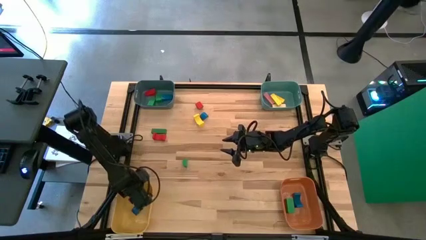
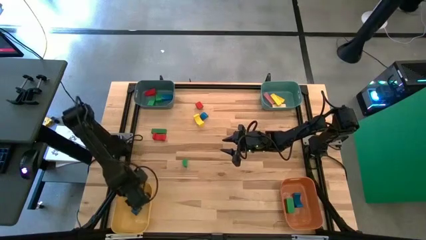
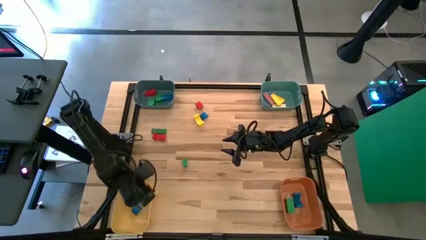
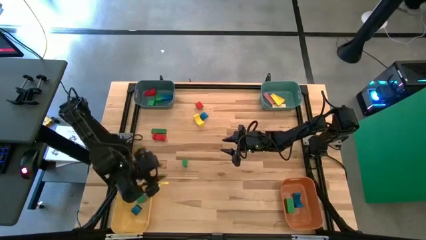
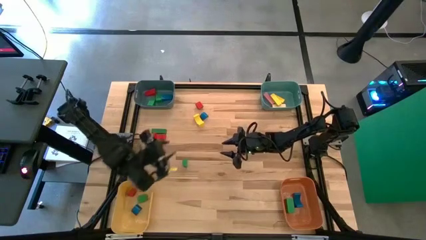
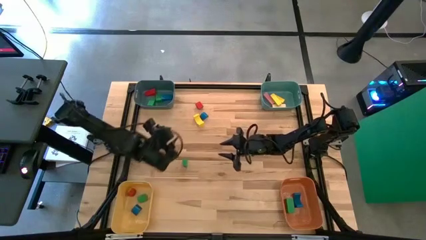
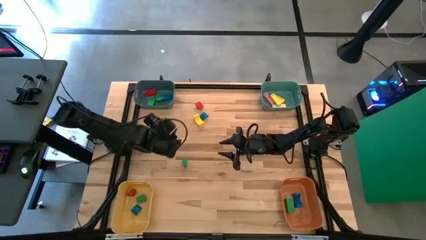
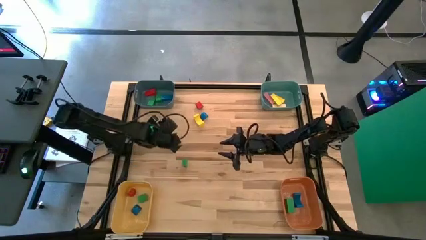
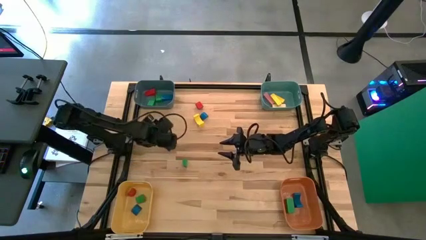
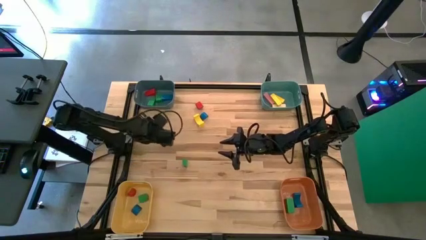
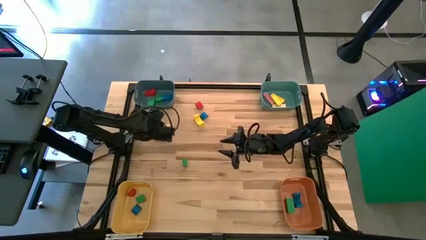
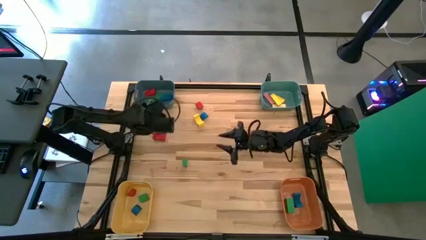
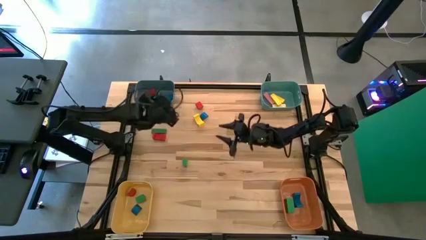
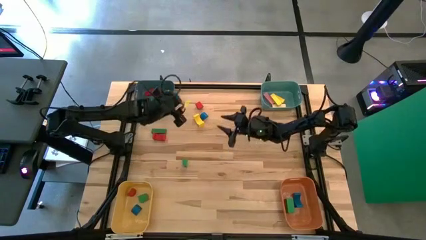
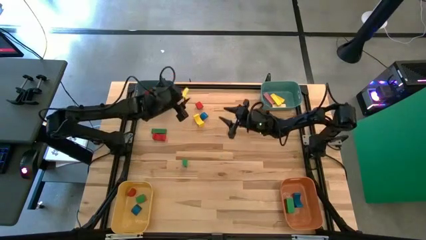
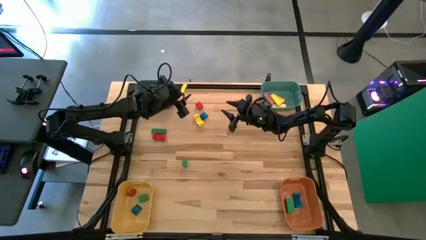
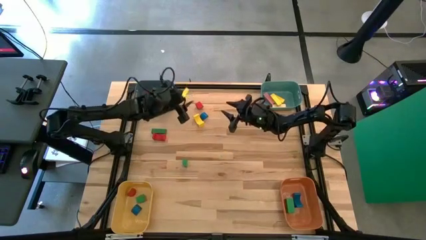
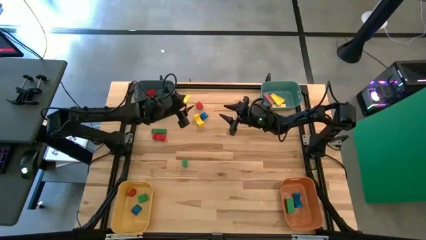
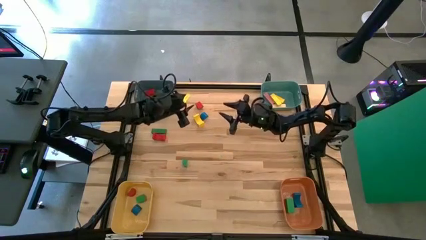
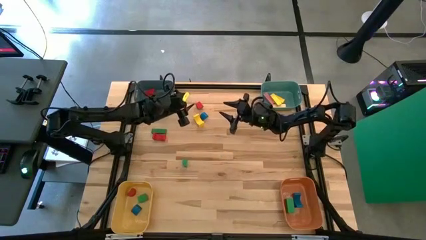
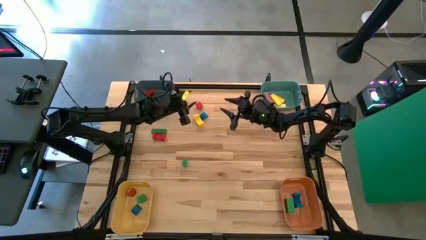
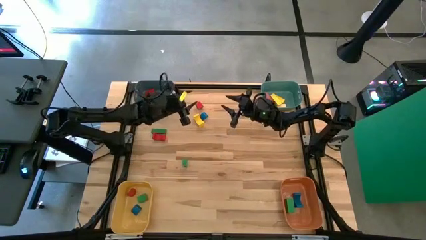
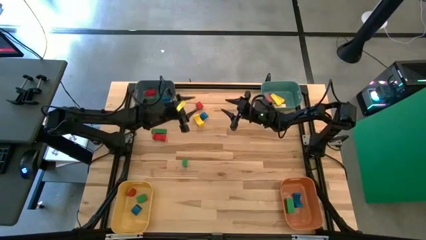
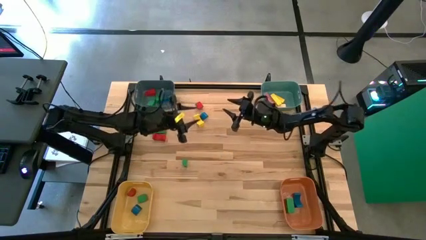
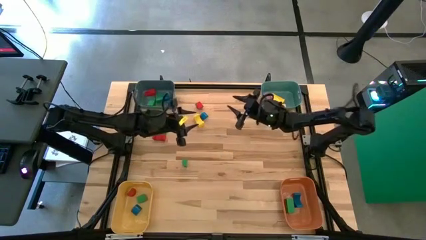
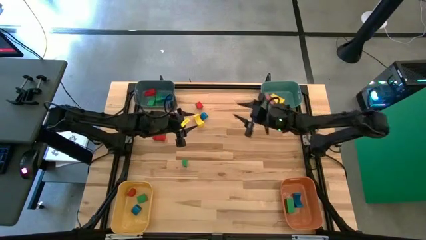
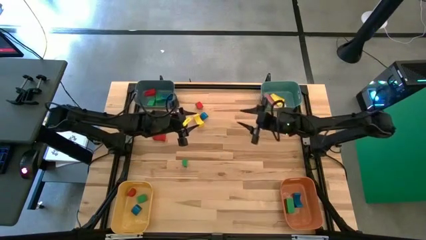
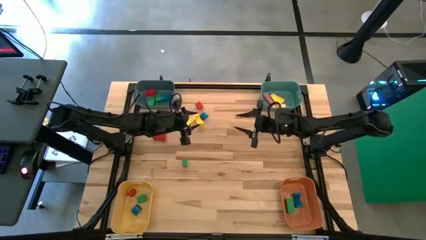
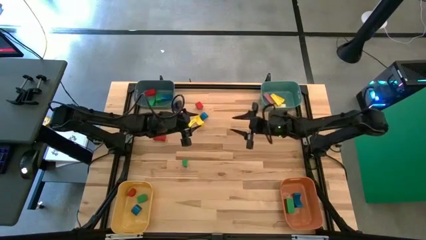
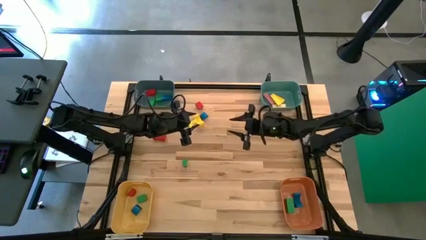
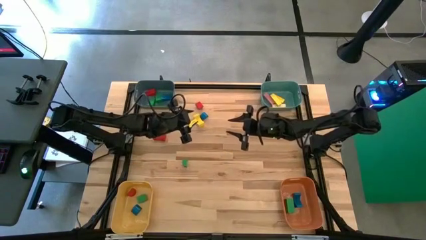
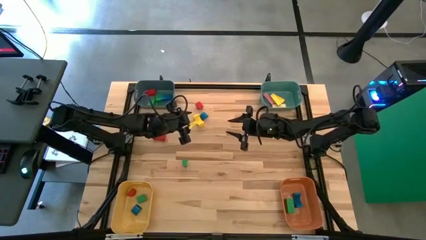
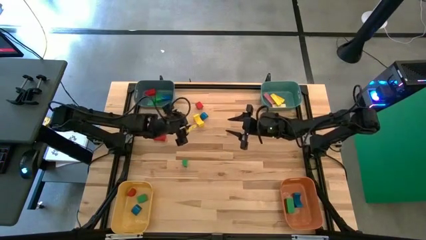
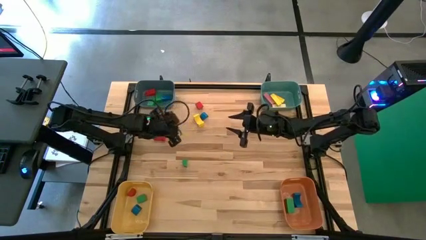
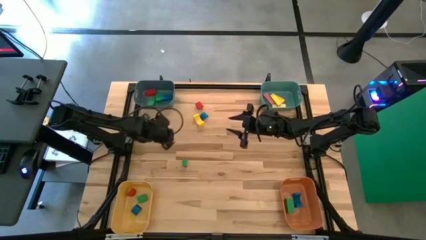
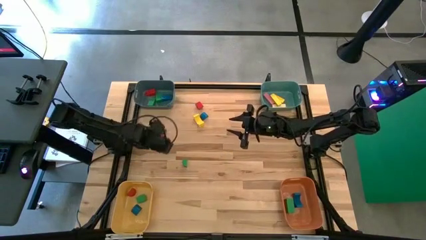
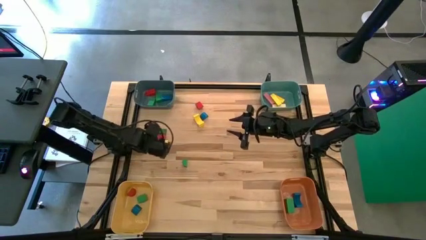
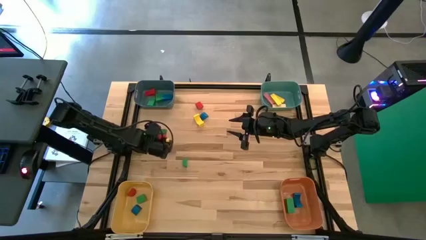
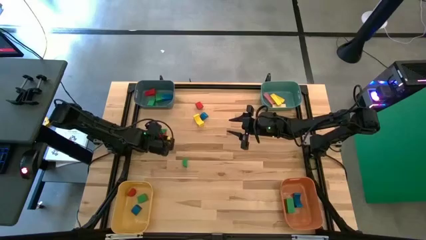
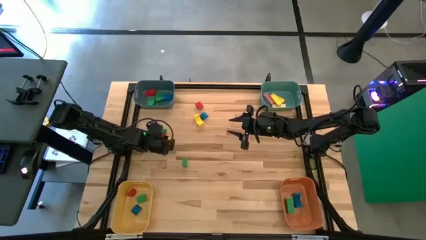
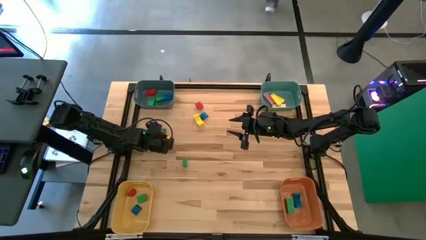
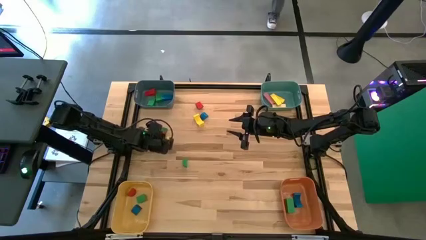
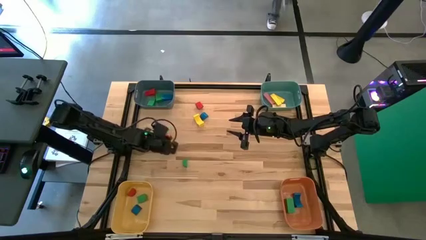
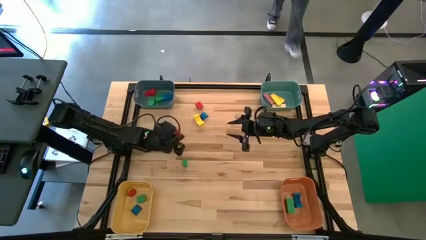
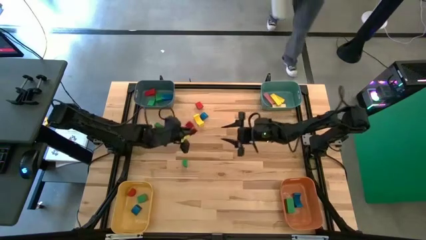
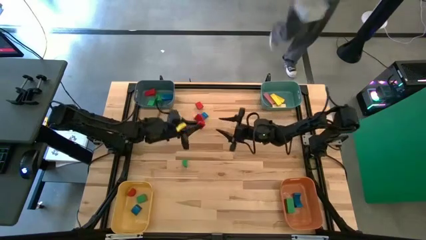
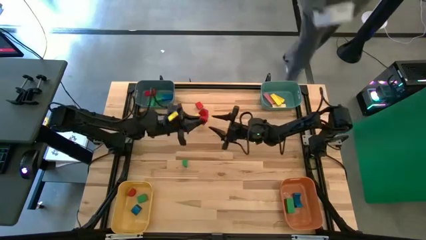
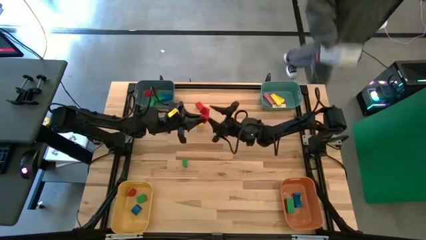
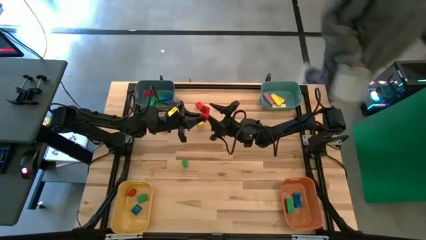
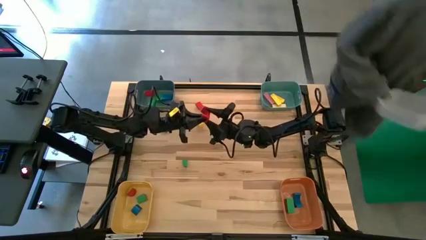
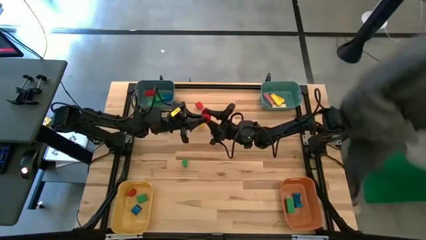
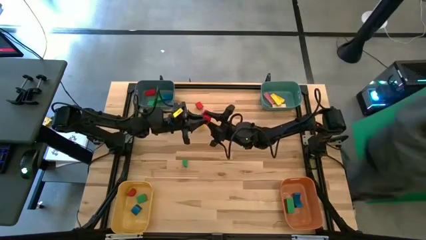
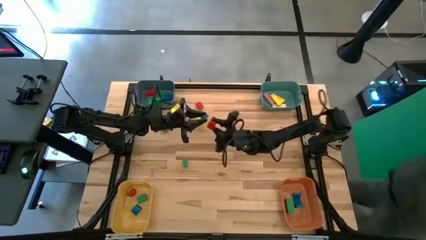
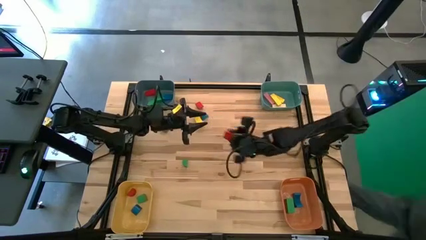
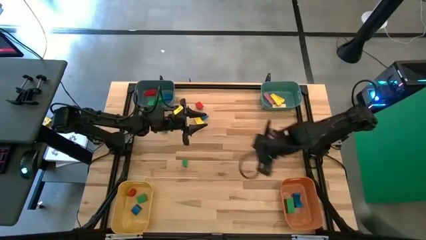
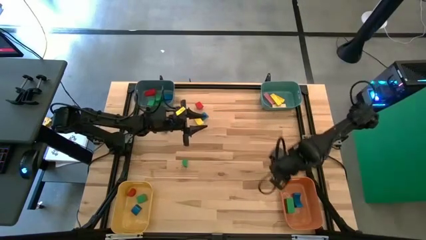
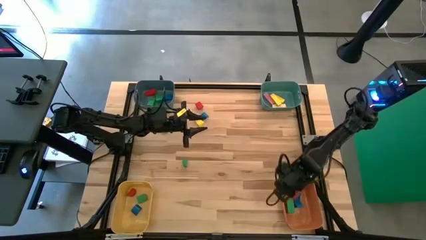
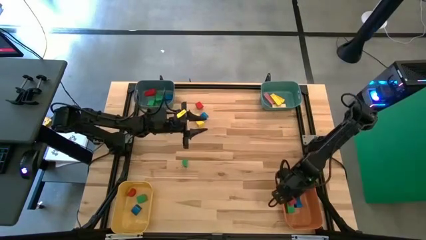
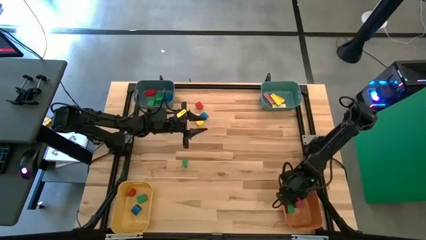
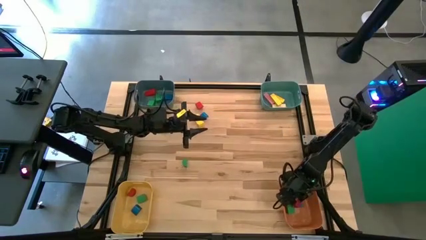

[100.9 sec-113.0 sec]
Task: Sort blocks by size
Put the red arch block into the yellow bin

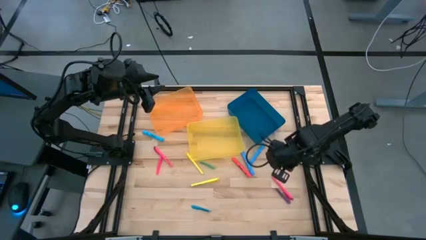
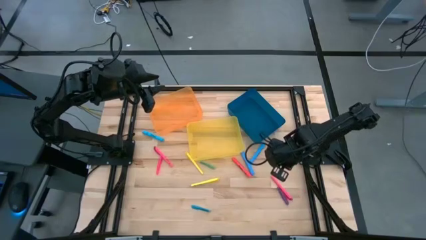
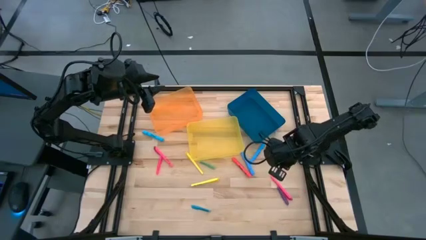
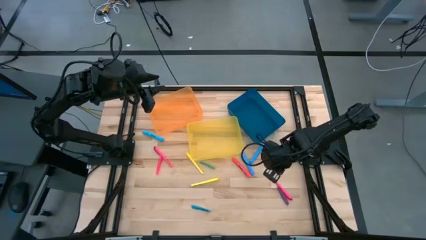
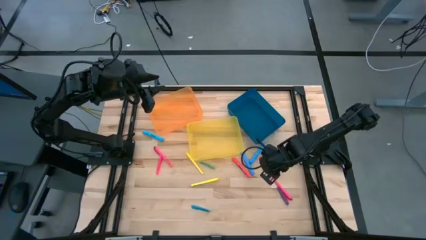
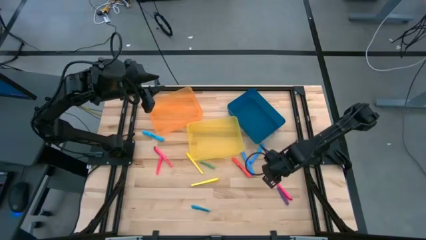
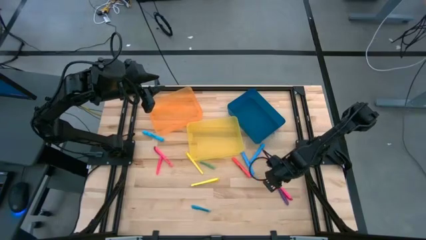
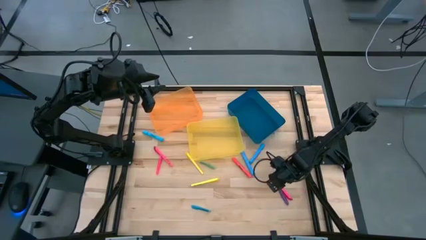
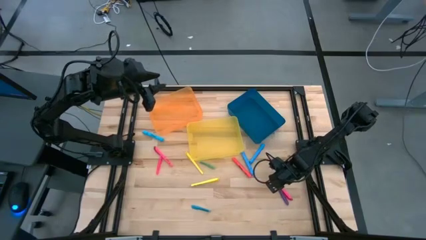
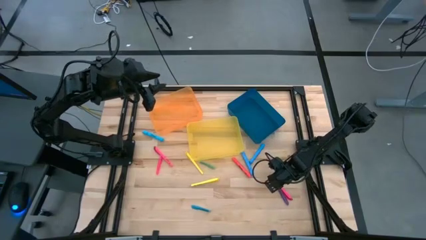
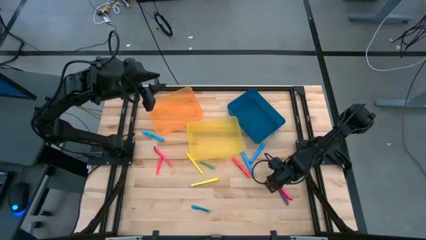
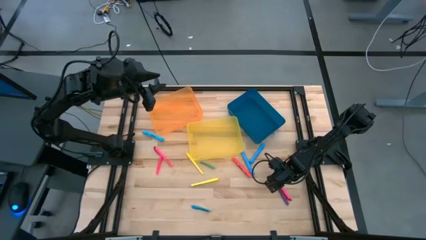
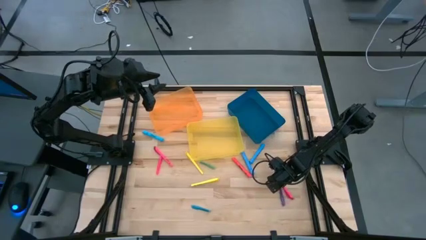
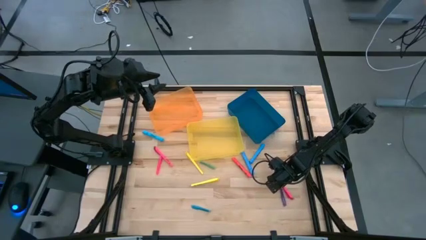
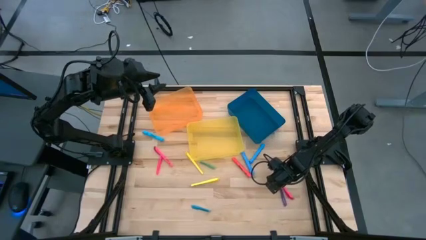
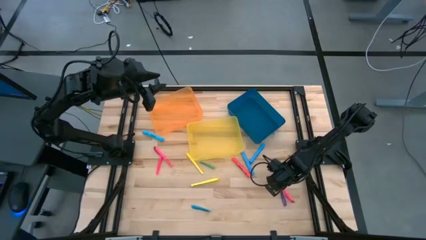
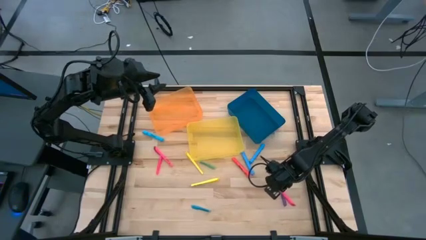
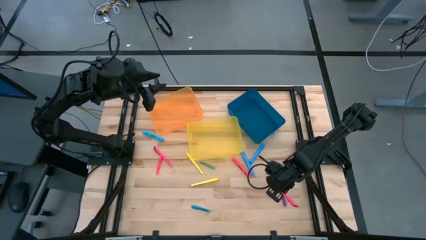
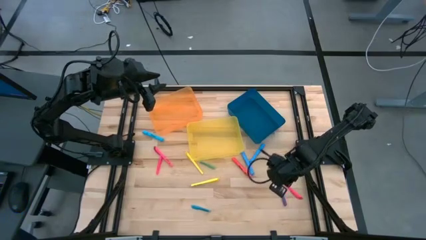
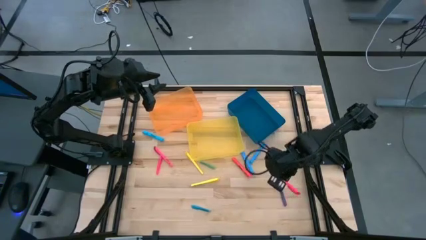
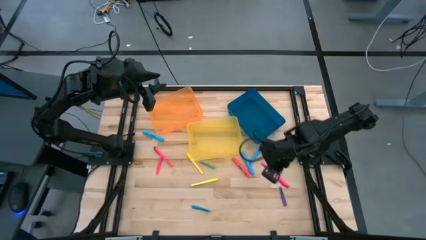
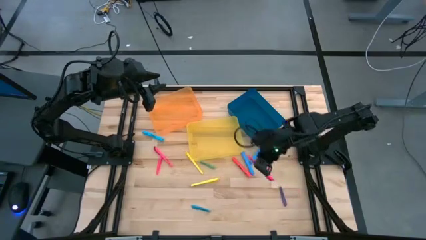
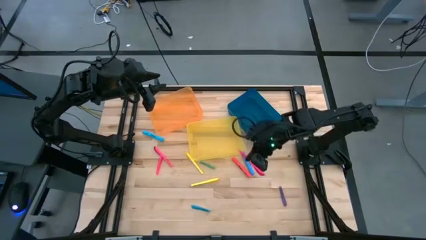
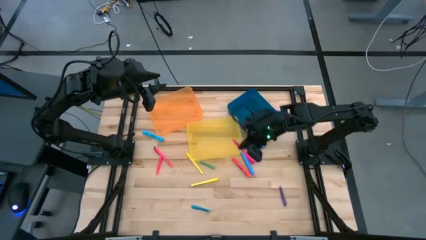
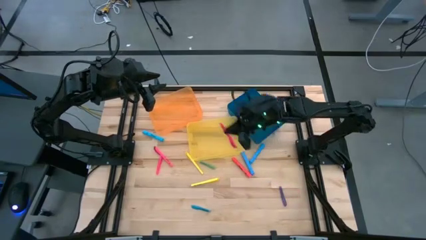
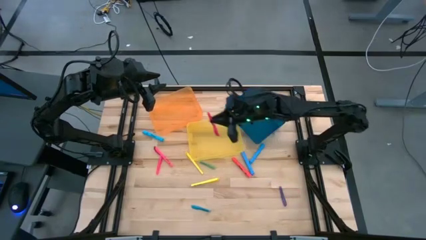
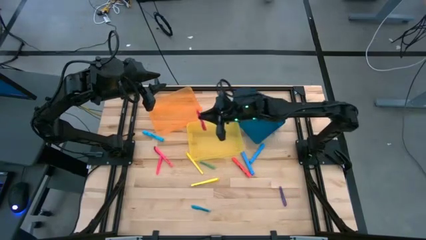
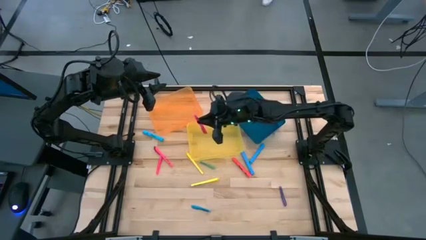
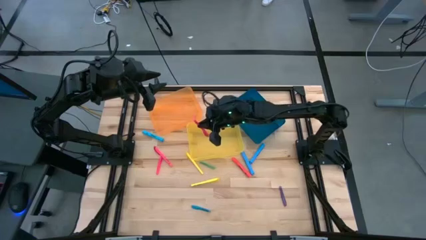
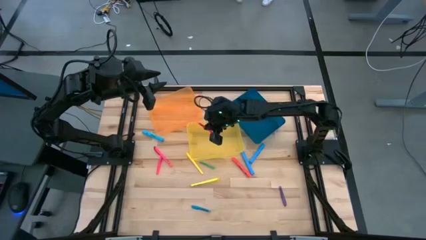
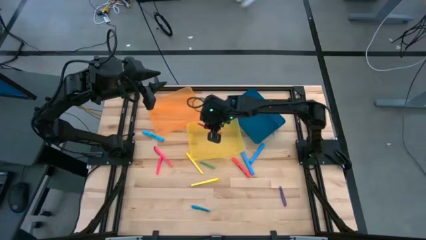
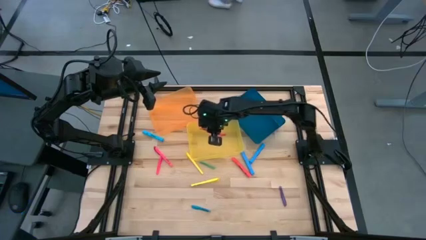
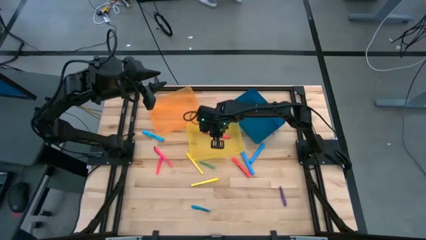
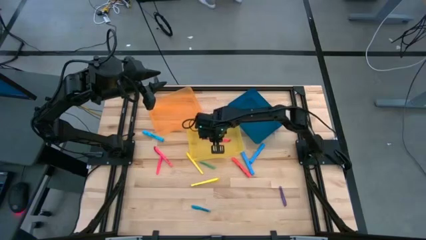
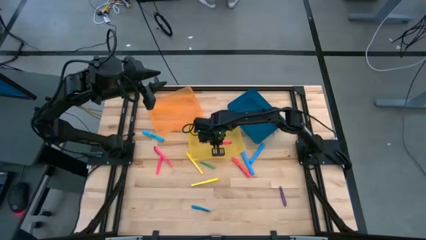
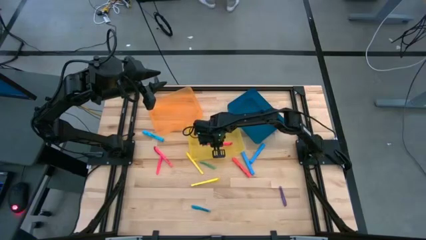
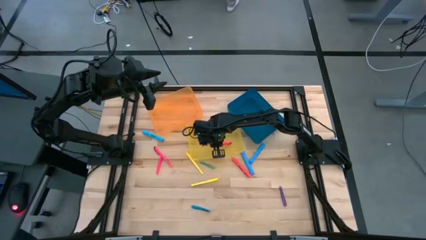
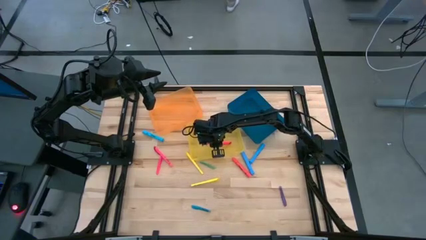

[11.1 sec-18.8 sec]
Task: Pick & Place Markers
Put the bottom medium pink highlighter pen into the yellow bin
